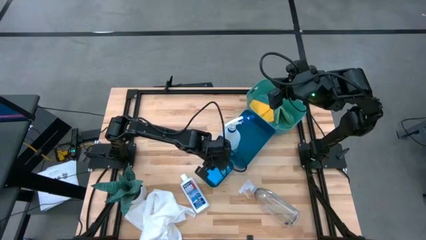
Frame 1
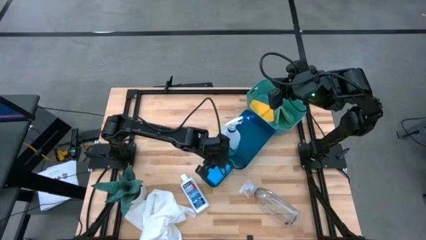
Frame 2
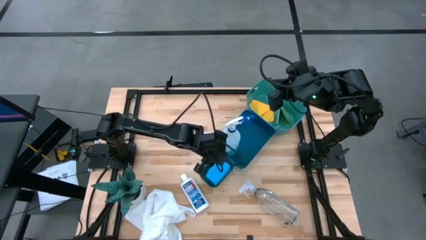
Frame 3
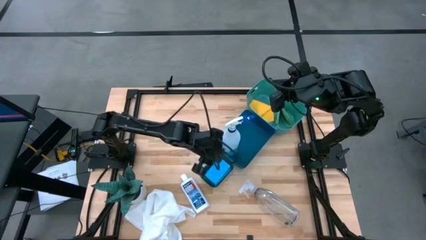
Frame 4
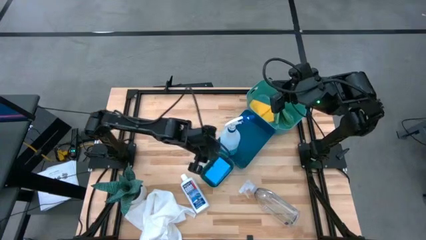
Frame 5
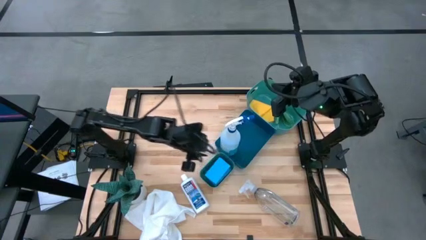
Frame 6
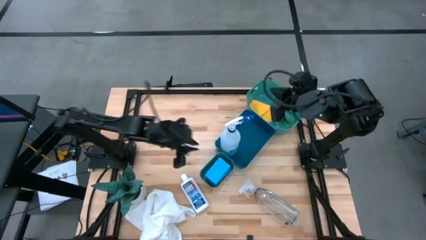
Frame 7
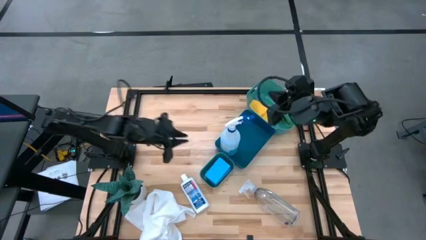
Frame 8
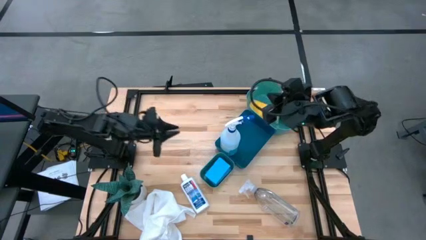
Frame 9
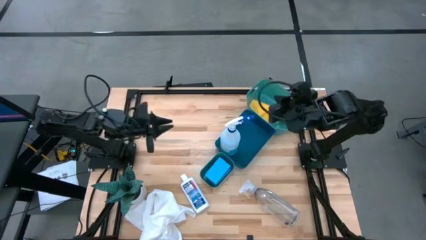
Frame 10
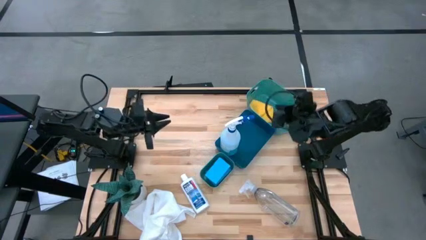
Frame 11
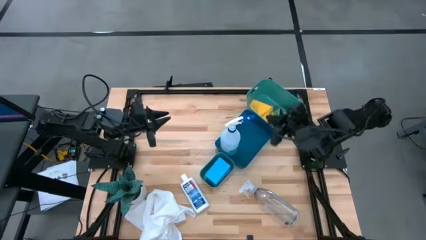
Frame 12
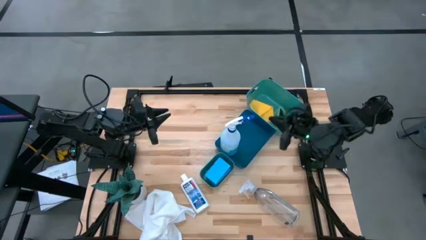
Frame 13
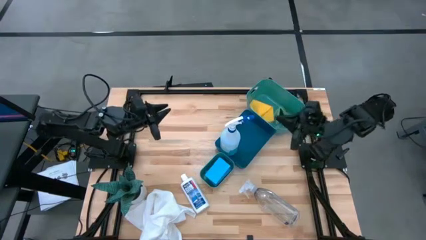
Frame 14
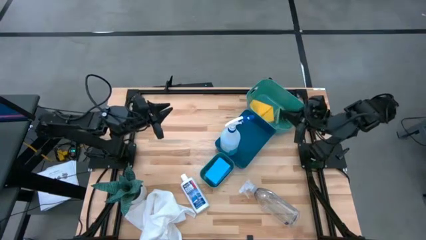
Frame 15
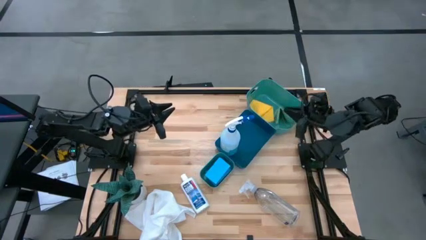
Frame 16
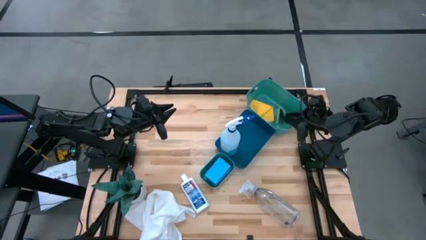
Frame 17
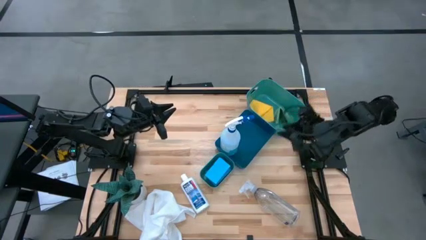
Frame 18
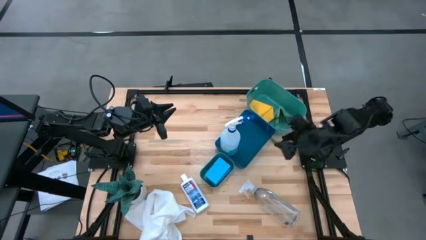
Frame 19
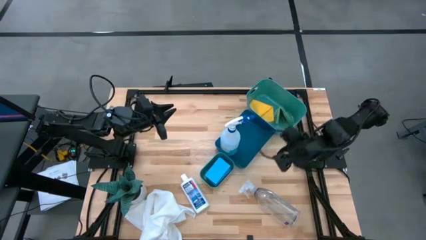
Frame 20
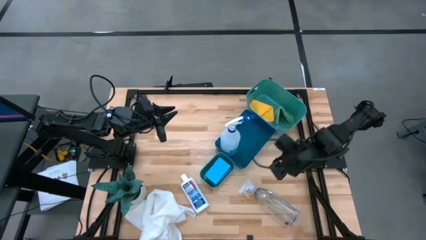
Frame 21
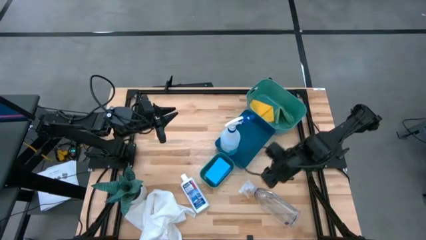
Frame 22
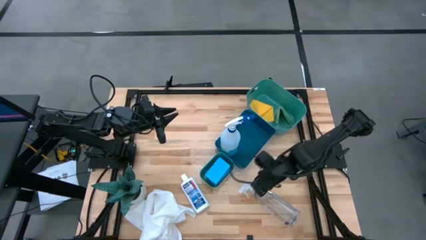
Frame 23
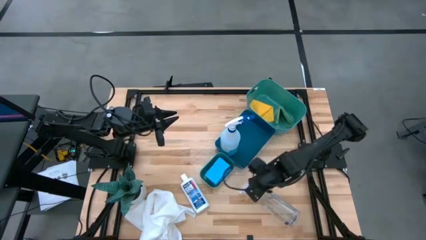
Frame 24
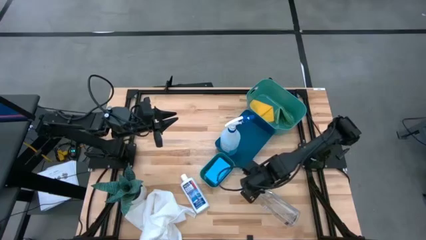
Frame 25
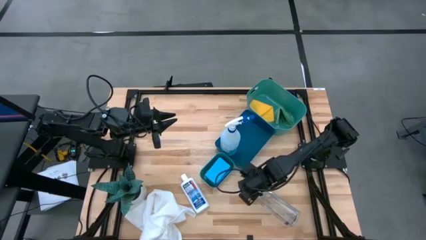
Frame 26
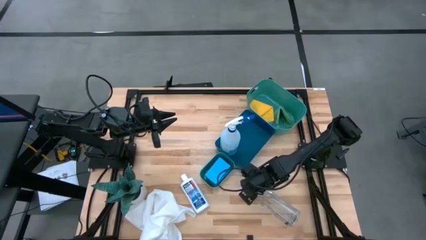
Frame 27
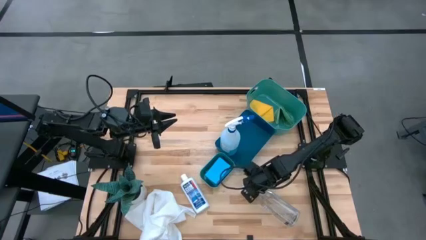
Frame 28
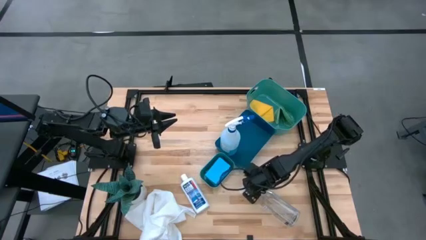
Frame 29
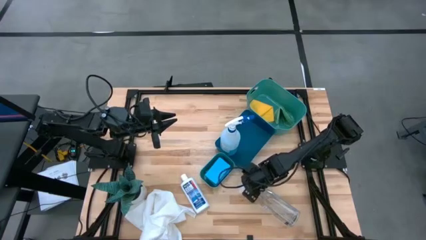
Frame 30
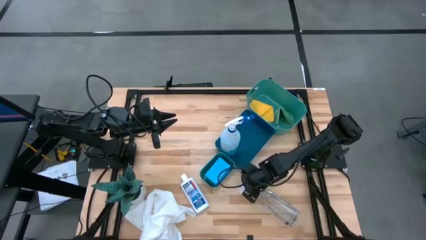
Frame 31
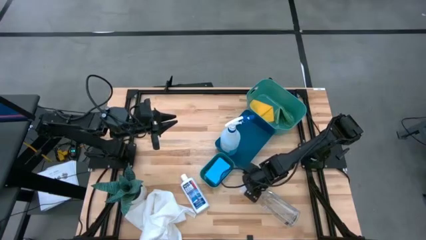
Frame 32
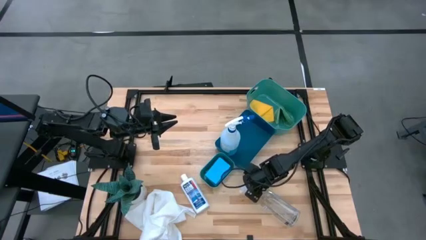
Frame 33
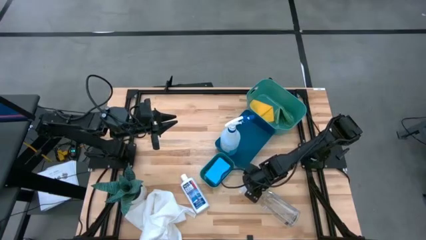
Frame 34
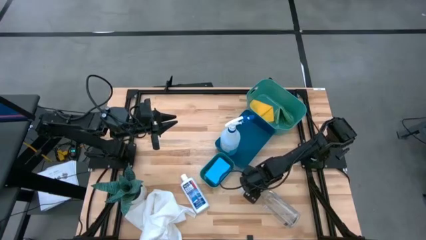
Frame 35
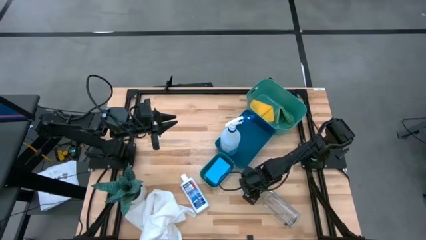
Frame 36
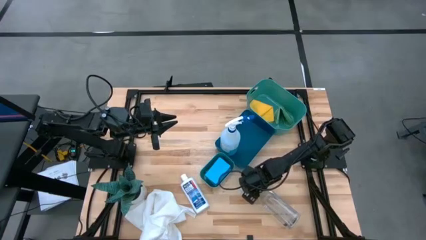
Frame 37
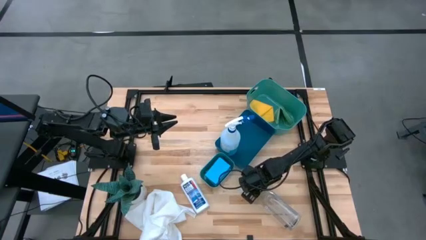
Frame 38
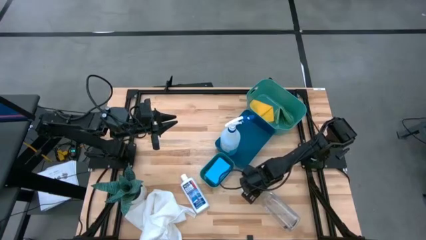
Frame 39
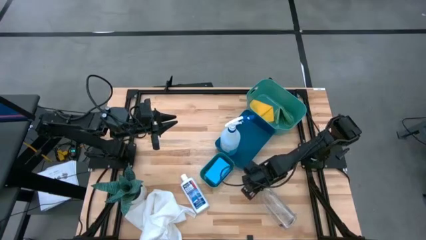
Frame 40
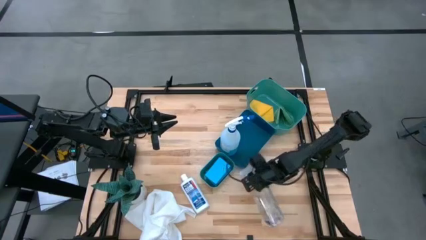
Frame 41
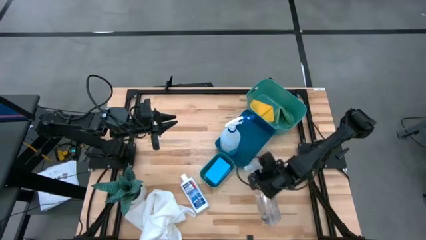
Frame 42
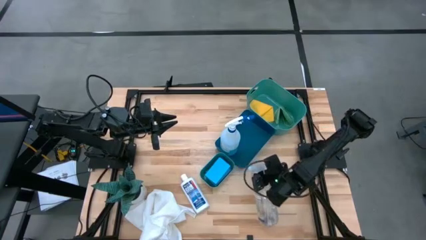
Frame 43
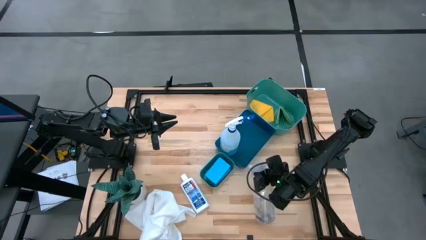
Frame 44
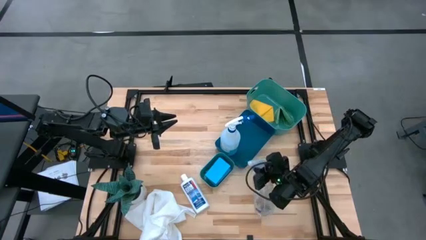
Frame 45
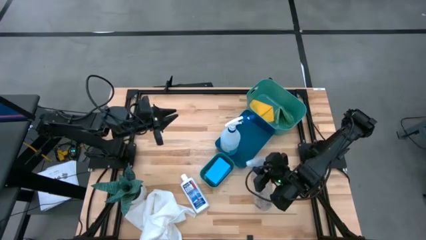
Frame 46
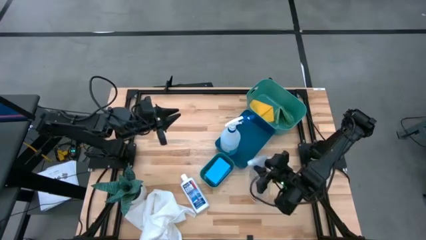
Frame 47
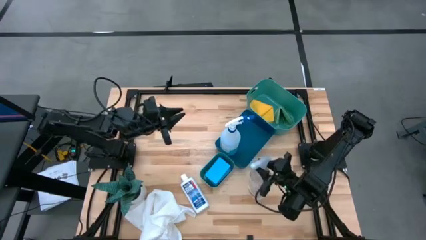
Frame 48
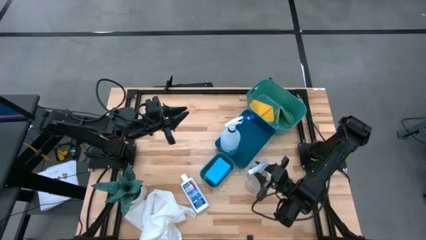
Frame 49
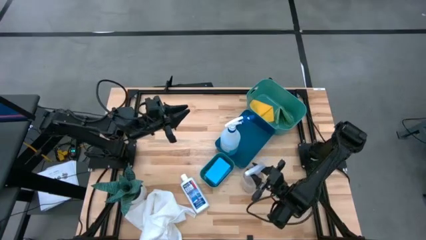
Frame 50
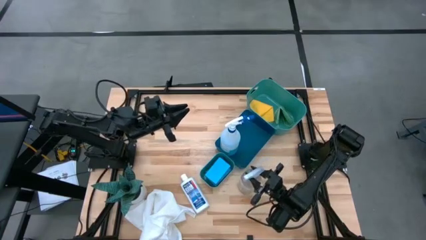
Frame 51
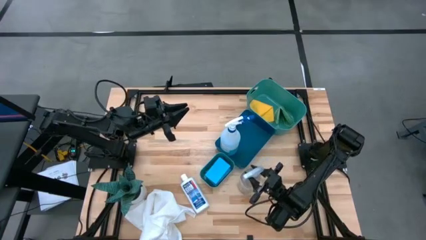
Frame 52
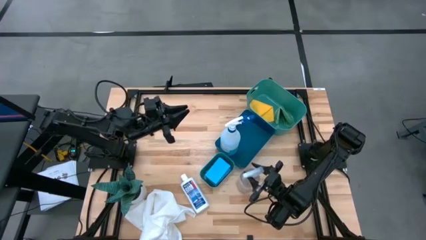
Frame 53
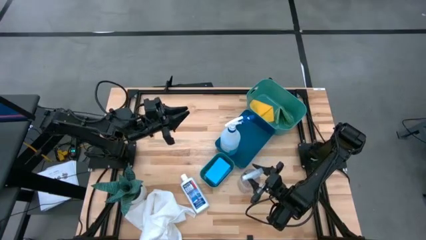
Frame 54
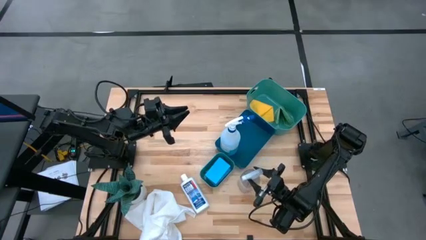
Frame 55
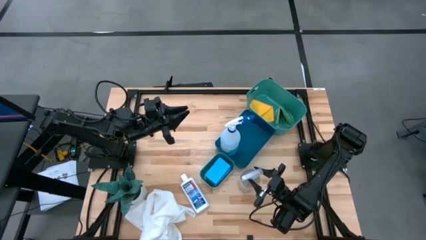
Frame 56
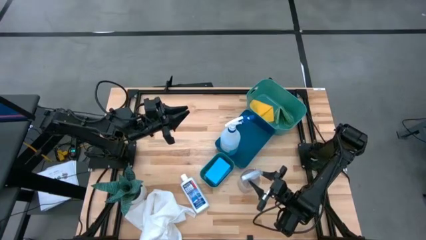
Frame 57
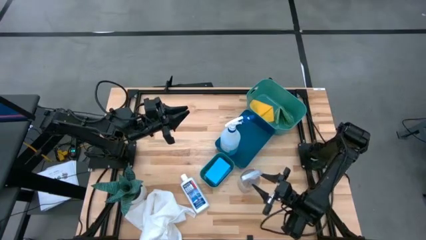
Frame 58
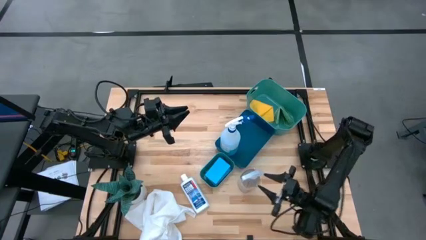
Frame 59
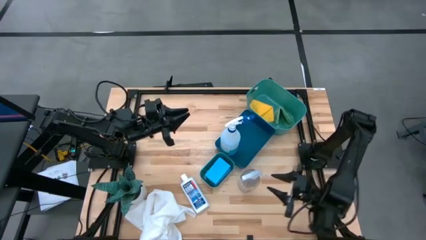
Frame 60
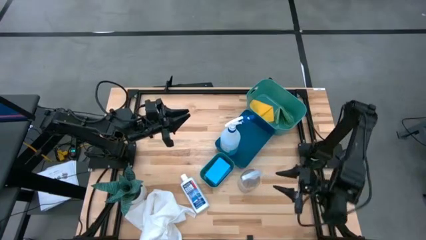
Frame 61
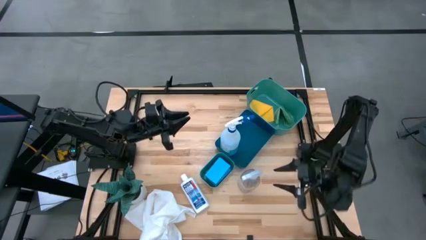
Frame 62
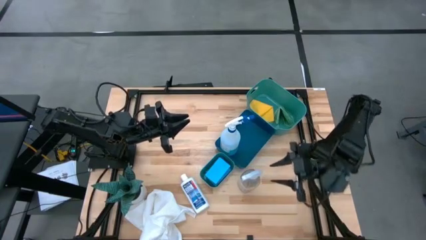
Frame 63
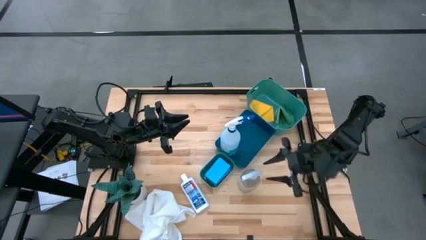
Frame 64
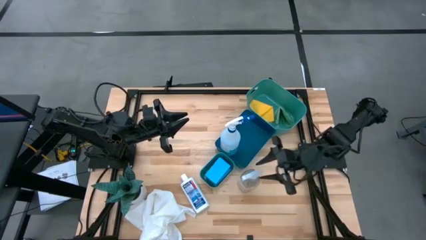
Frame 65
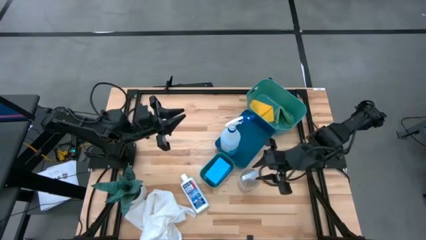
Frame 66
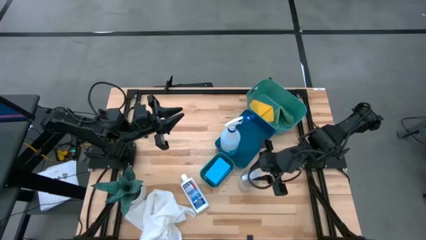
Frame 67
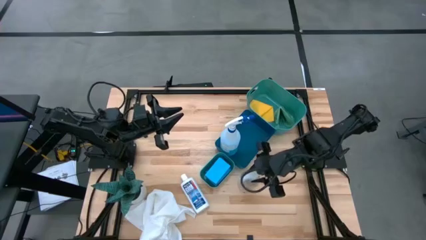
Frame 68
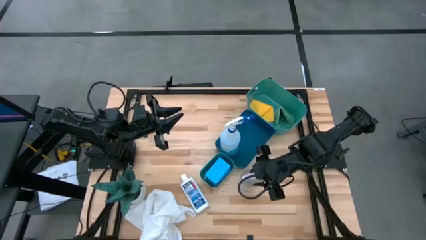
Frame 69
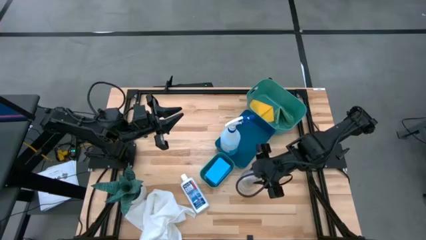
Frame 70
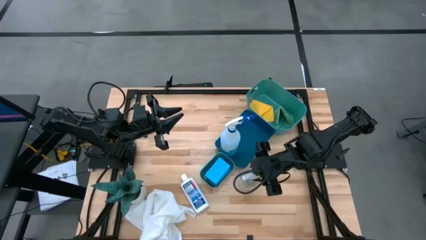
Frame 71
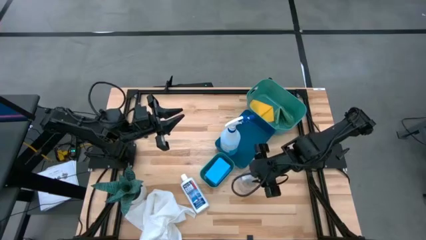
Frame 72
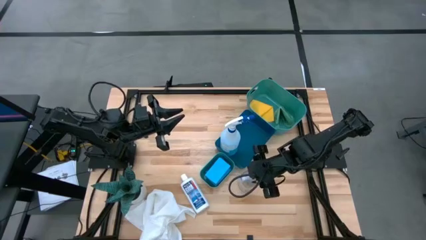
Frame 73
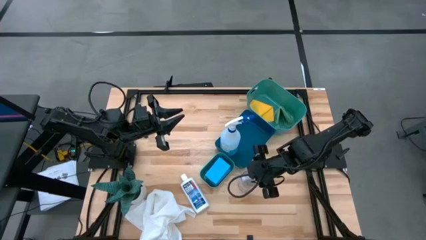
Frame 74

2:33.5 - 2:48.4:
Task: Pick & Place Kitchen Items
Put the transparent spray bottle into the blue bin

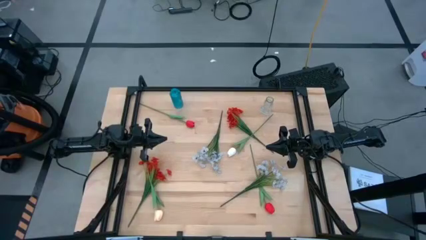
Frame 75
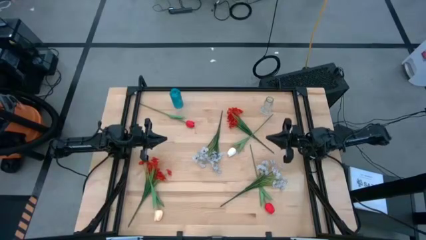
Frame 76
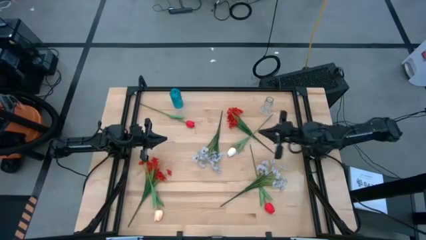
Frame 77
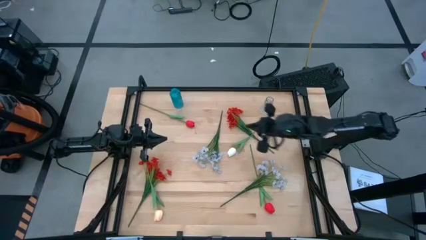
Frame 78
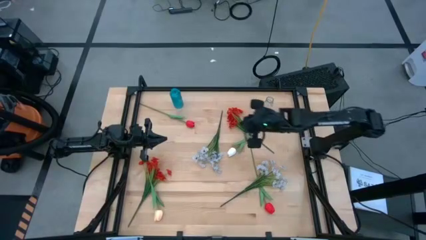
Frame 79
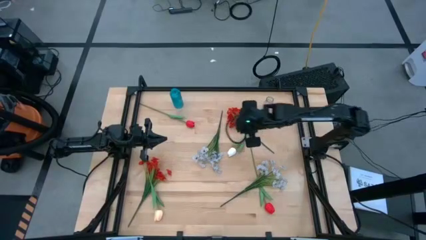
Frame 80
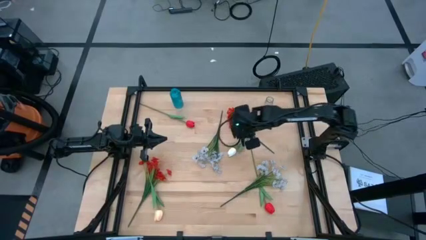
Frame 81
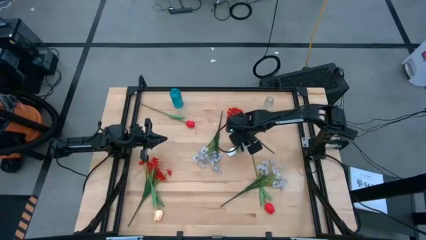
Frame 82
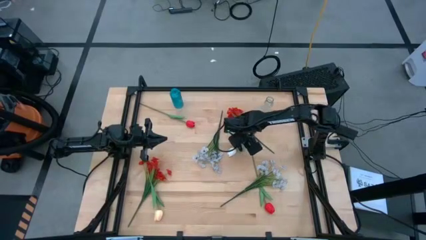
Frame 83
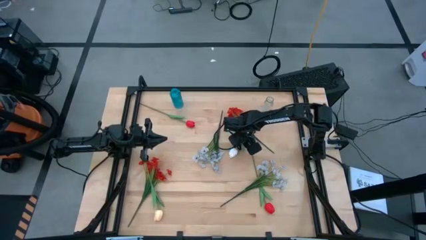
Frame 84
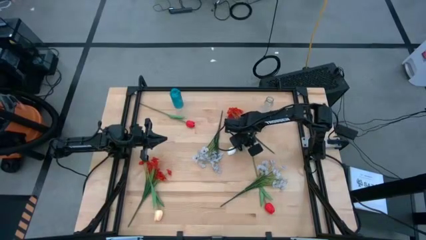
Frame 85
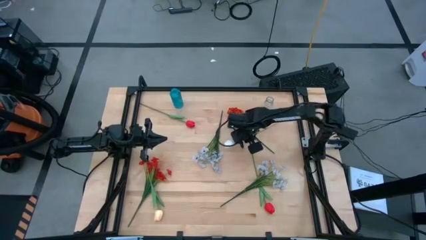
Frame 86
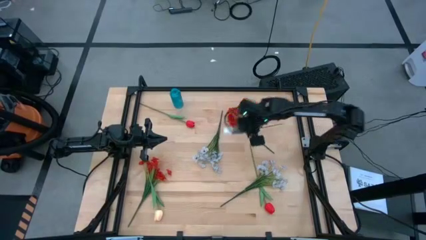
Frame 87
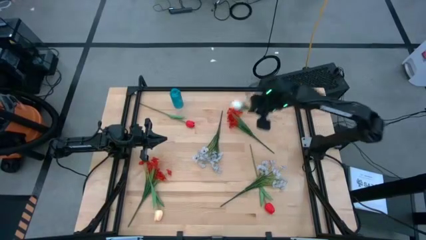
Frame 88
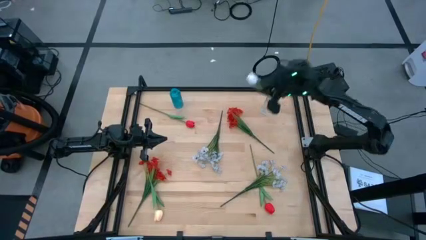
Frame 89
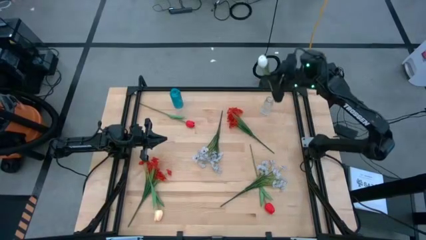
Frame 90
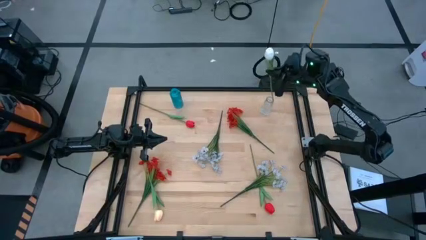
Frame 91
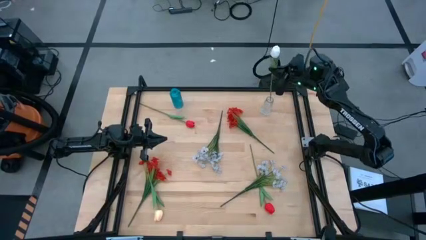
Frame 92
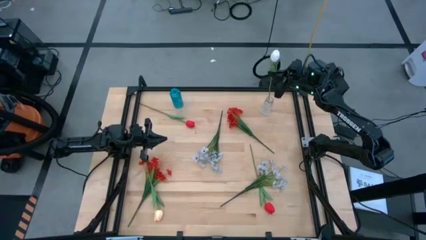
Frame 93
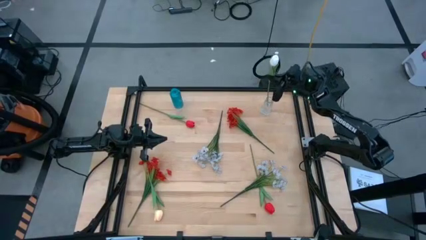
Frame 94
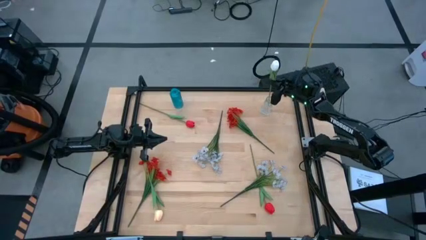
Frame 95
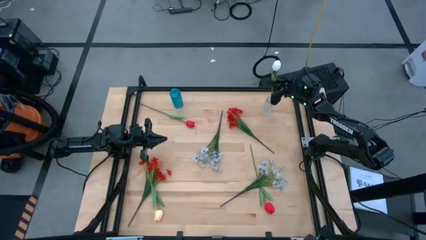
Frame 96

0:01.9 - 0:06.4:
Task: Sort flowers into vase by color
Put the white flower into the transparent vase
